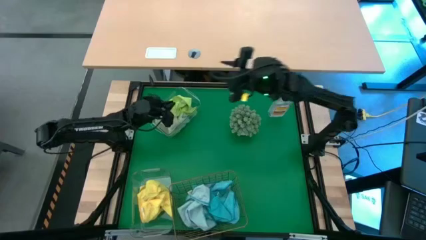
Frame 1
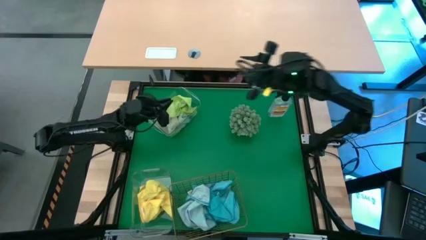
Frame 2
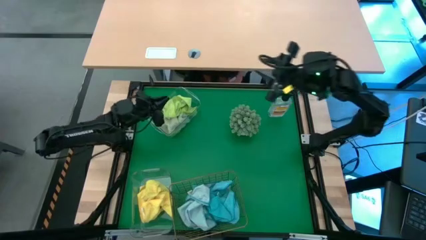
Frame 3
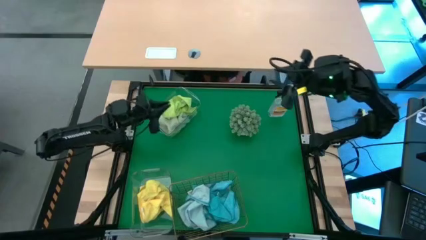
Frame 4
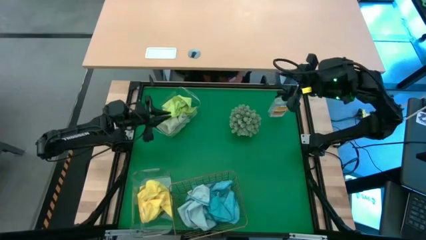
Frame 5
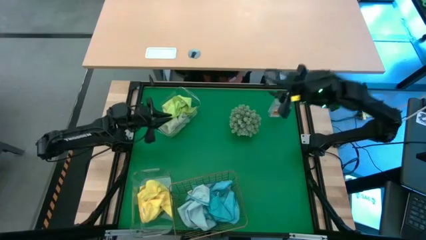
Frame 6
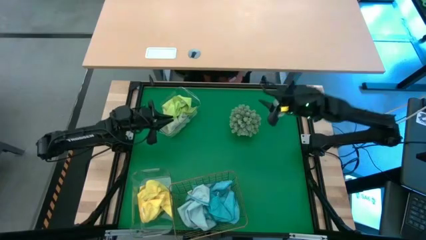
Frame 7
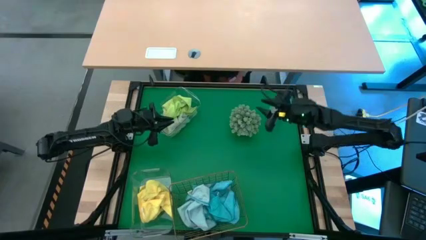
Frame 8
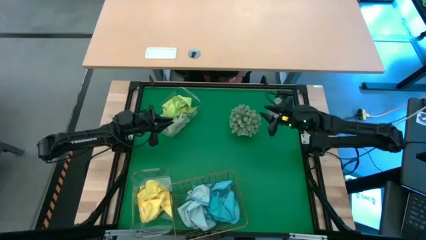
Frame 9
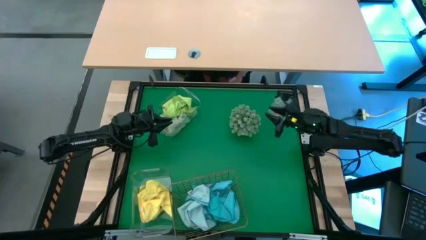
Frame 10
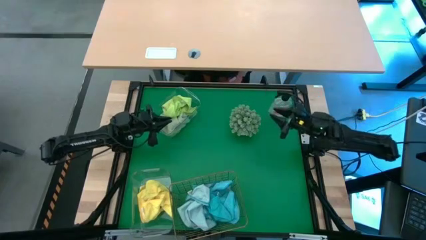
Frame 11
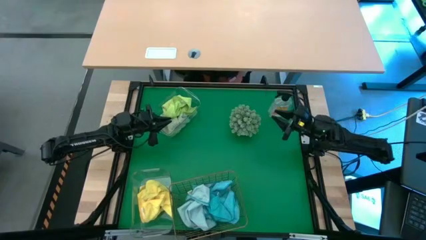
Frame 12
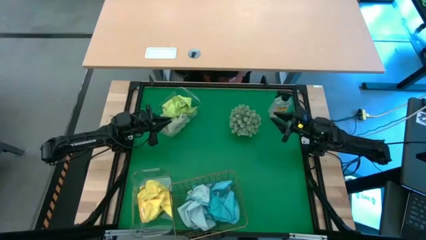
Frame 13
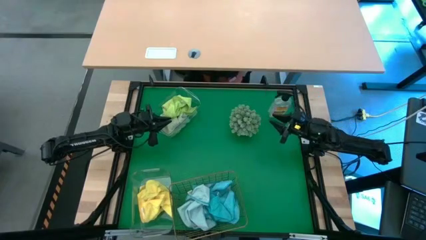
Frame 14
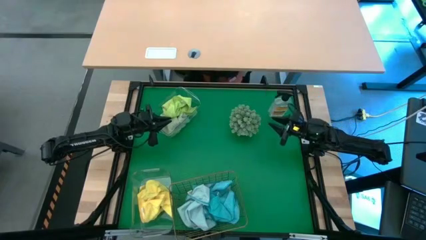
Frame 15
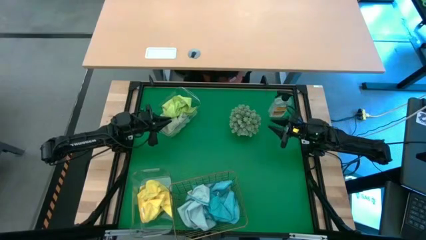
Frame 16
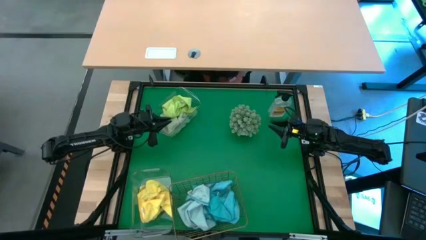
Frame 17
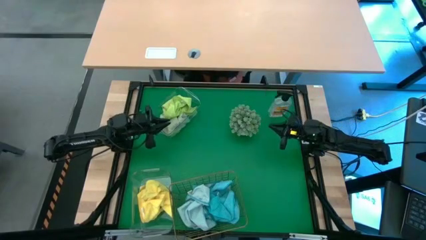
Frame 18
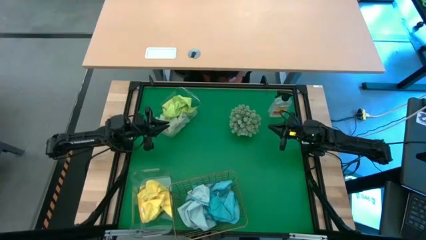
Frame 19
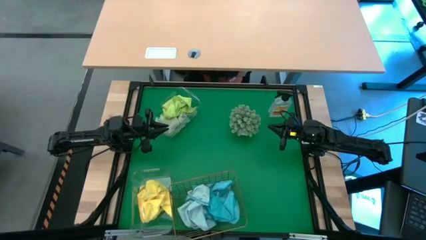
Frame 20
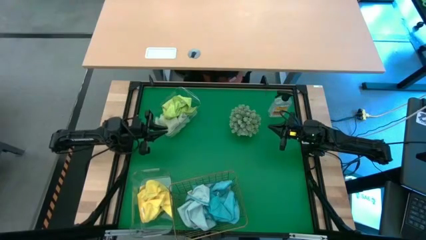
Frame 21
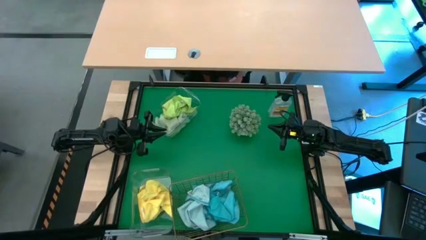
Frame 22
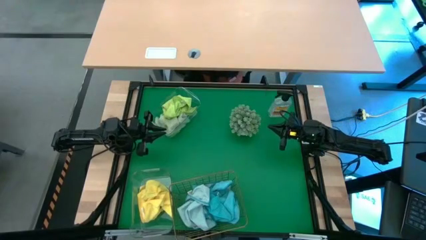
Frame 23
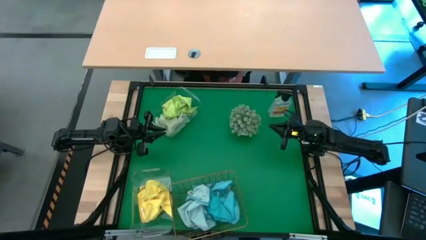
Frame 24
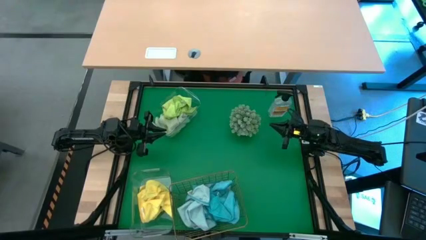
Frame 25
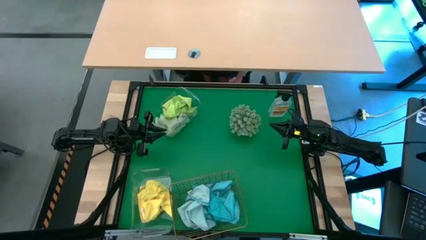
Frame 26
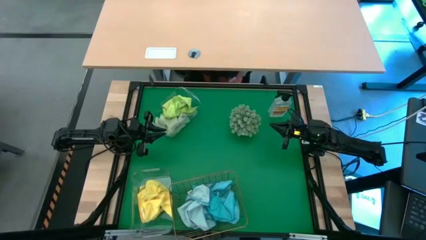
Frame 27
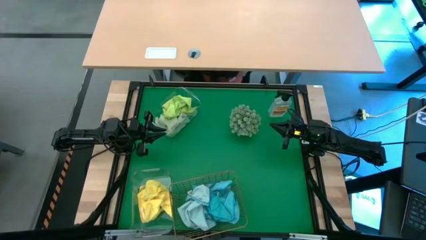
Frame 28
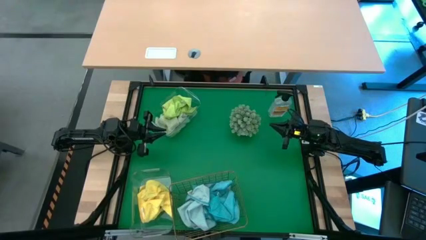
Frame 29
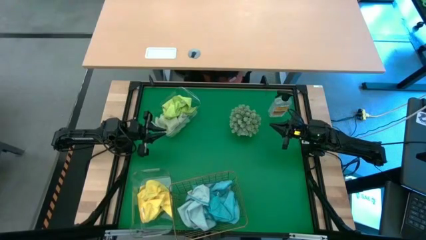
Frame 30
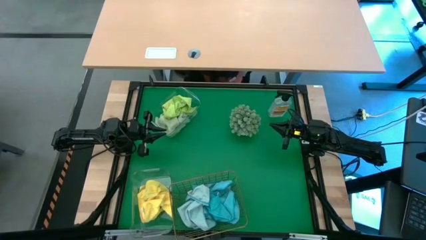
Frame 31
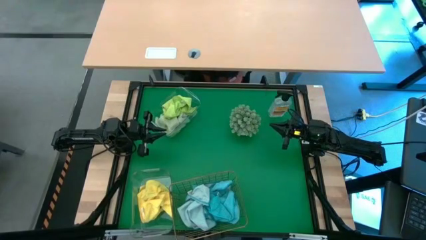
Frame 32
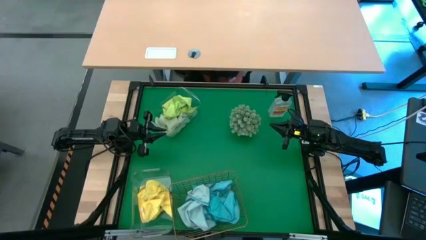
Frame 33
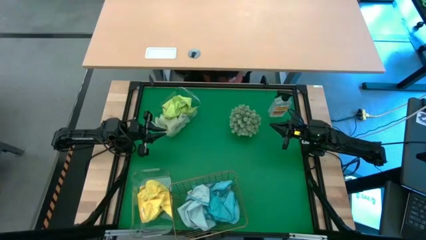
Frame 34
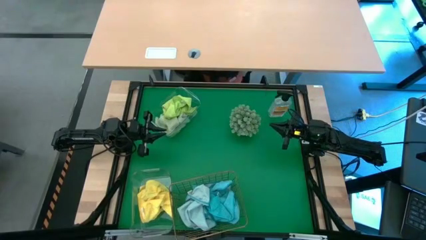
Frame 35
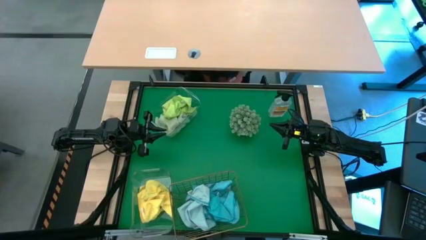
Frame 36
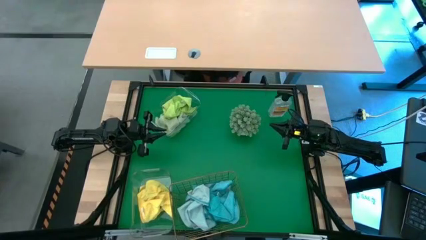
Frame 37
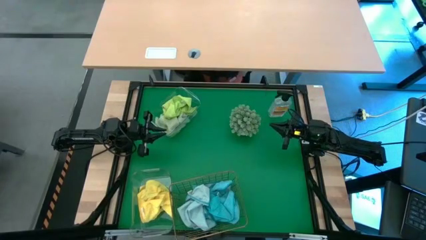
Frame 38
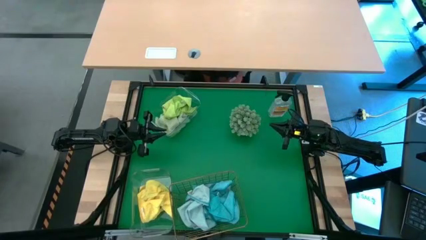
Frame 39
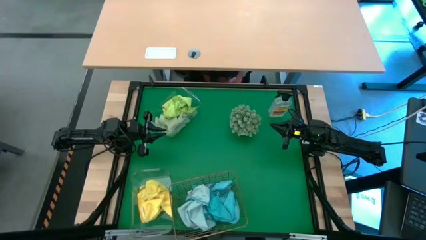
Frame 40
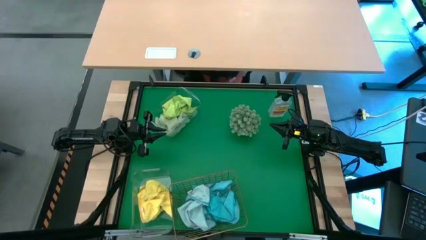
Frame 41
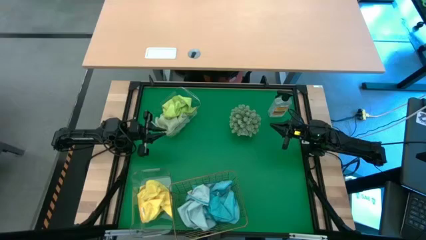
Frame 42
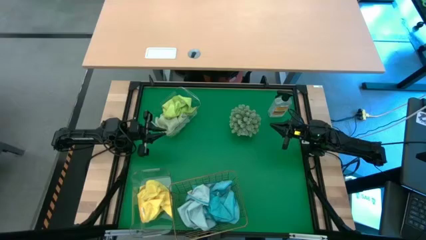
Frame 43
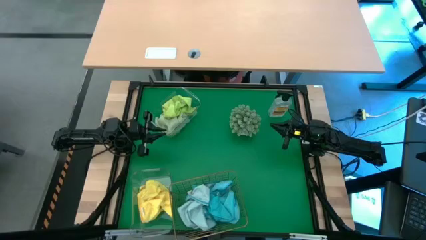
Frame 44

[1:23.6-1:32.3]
Task: Sort microfiber towel by color & place in baskets
Return to Home Position

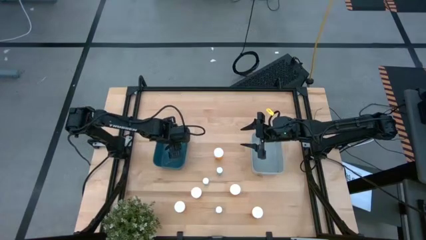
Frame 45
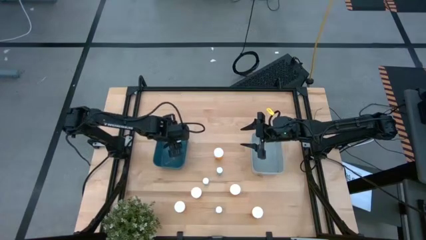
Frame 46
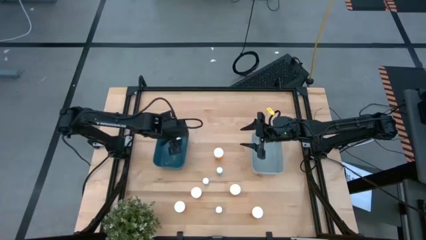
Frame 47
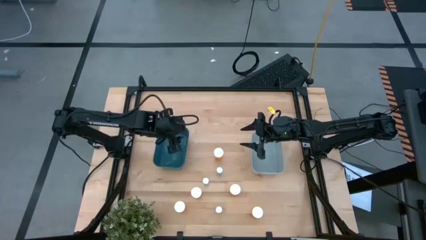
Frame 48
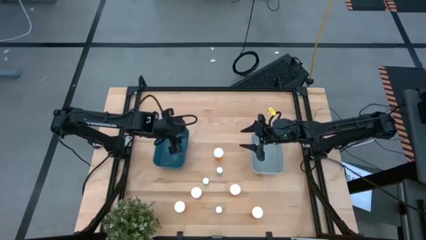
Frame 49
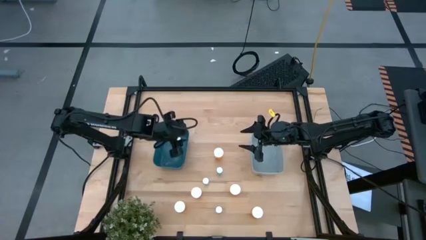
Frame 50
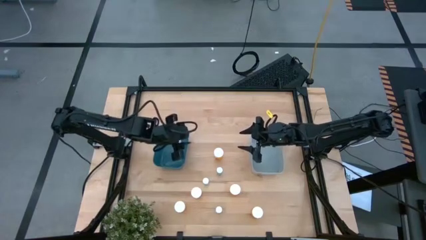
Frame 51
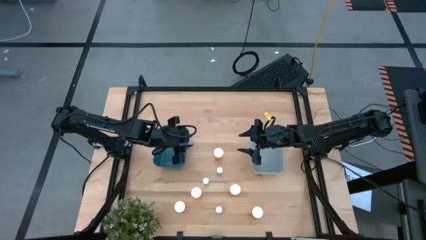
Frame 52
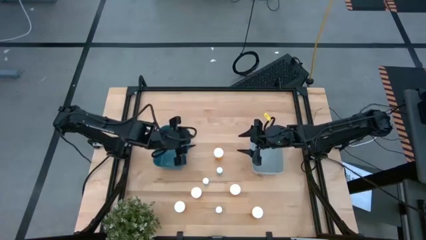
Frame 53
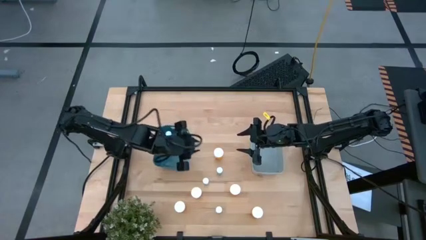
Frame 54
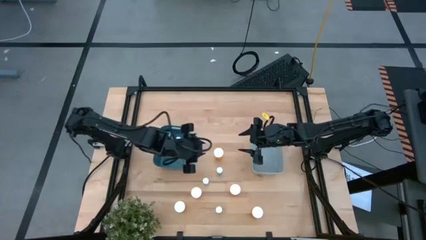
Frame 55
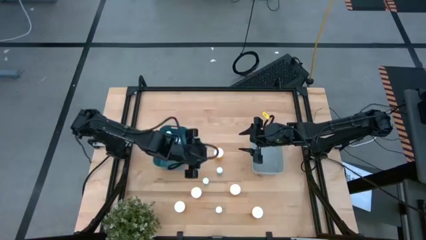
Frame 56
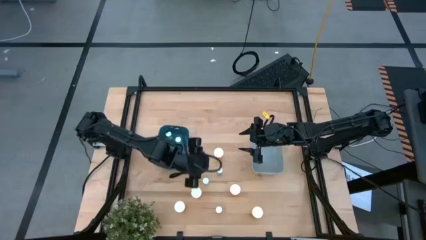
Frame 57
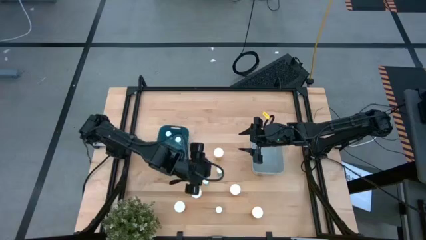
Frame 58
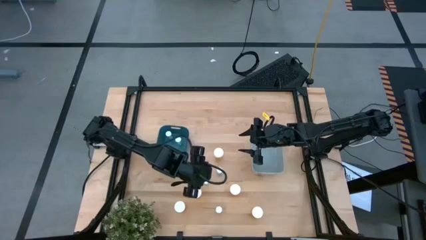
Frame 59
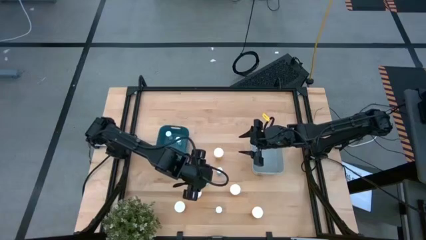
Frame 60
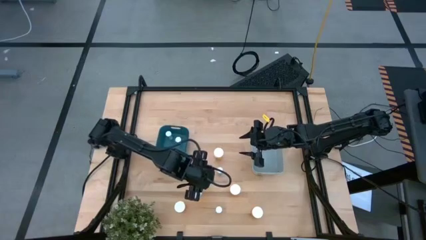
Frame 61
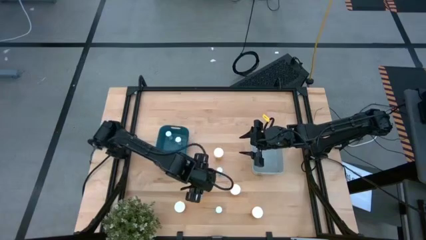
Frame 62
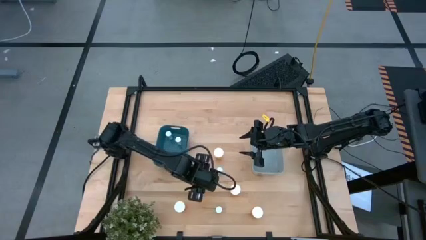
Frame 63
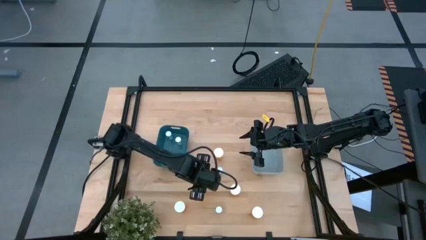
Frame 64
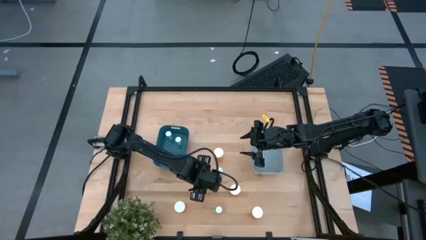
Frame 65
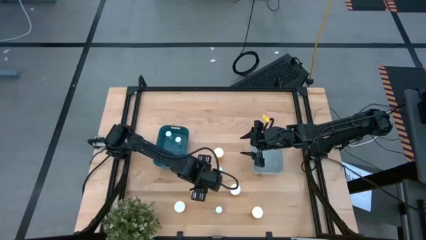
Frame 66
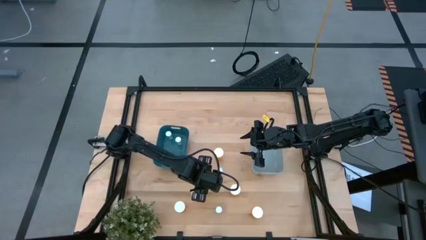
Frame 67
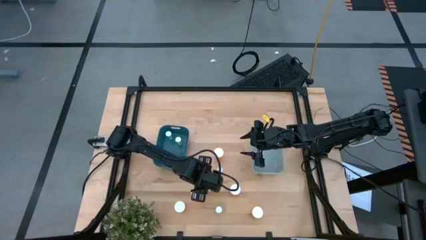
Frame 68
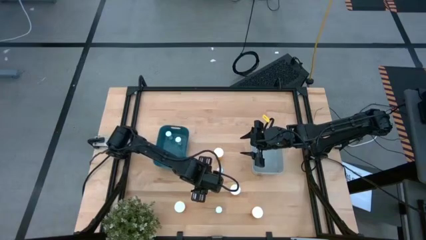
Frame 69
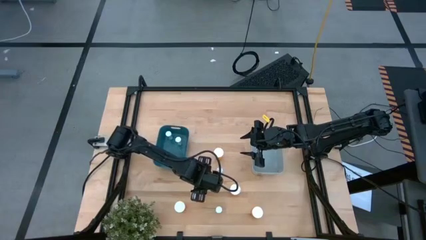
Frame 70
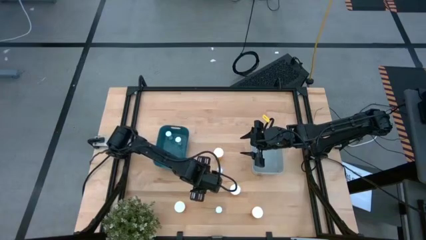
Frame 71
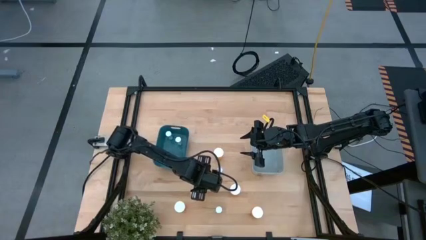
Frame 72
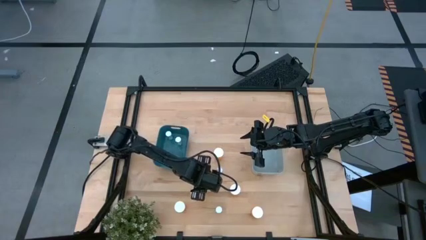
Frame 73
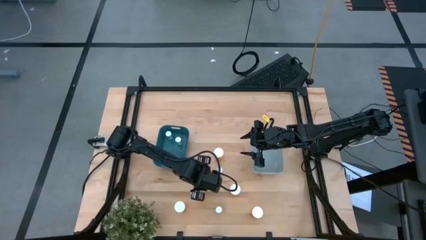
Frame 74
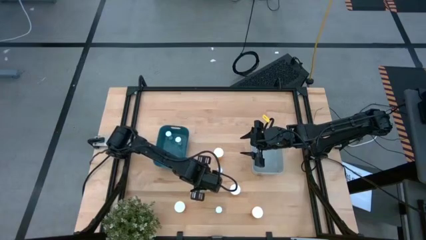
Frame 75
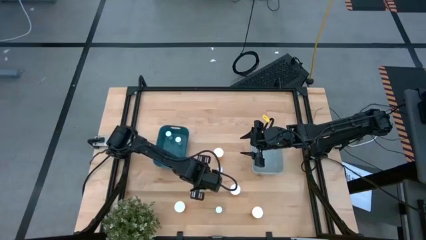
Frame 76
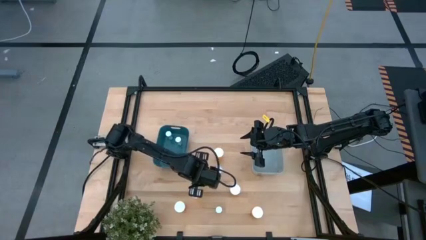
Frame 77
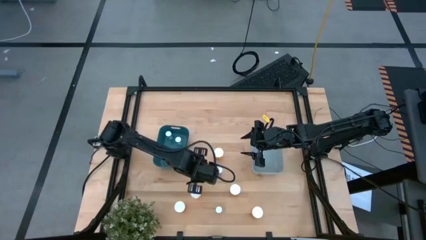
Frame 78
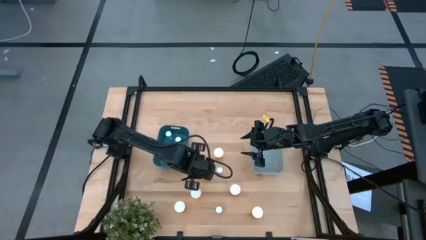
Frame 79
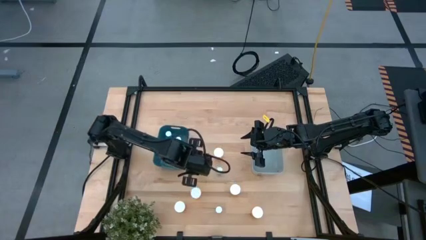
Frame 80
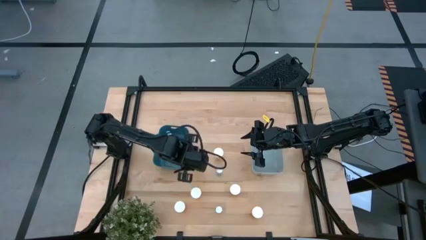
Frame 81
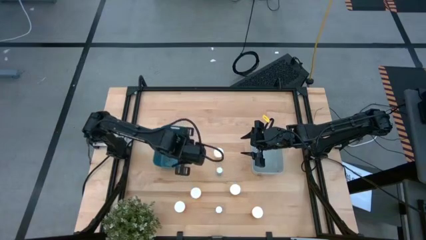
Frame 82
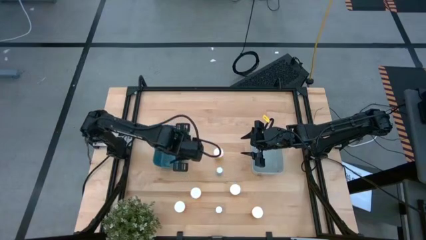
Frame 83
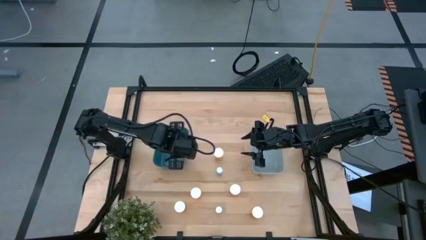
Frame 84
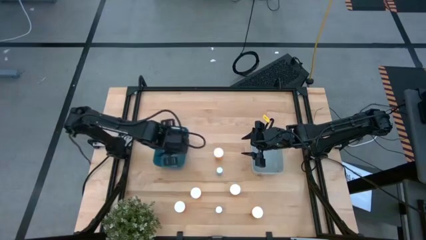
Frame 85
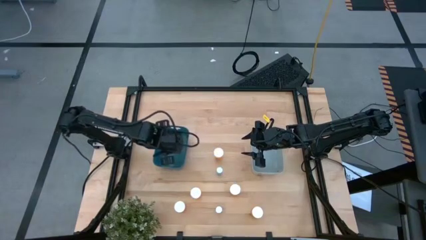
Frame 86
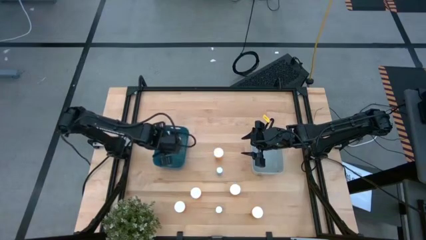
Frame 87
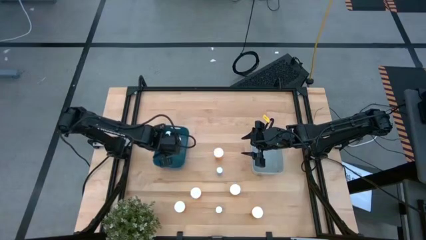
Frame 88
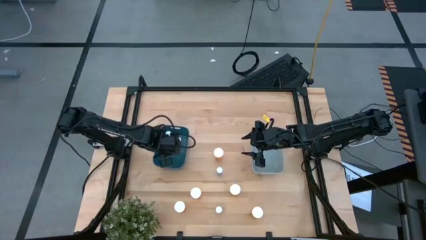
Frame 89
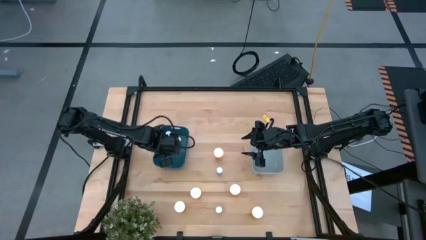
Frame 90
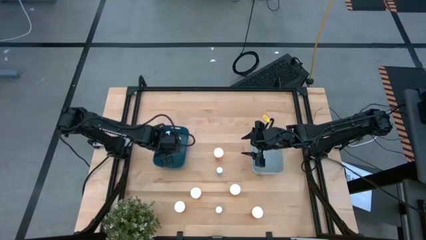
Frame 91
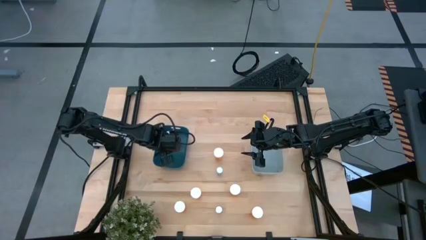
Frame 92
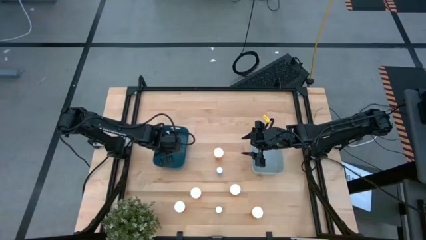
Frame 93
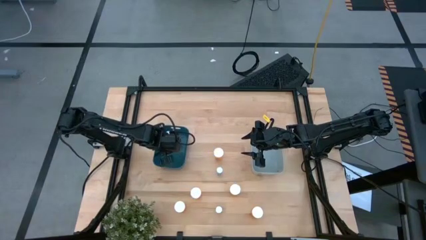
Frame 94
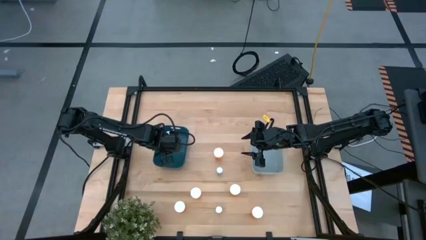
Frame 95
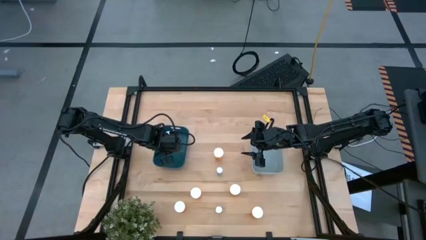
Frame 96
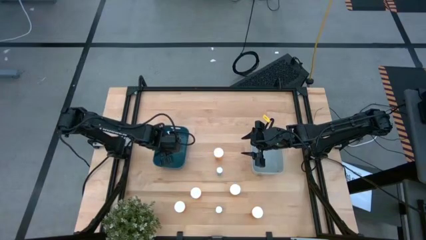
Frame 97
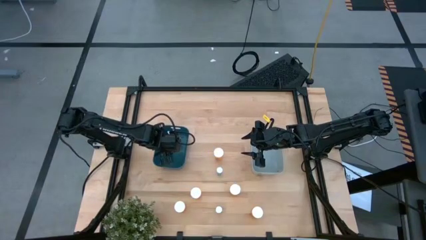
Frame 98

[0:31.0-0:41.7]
Task: Pick and place medicine bottles into bin by pill shape (circle, oval)
Put the blue pill bottle into the blue bin
